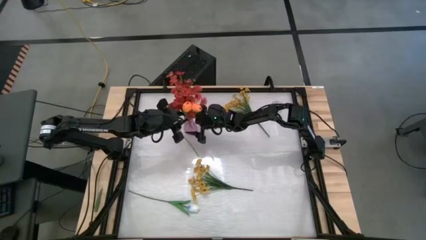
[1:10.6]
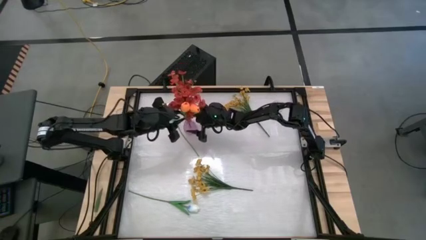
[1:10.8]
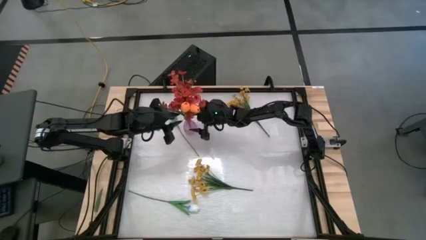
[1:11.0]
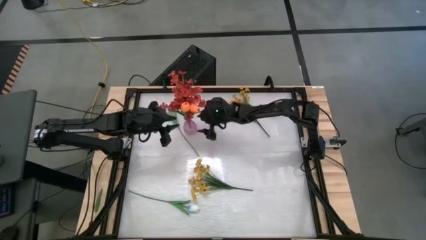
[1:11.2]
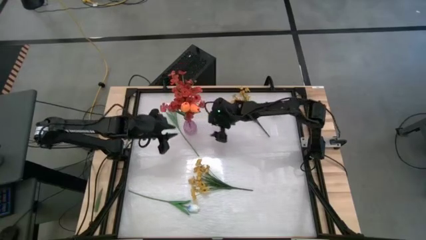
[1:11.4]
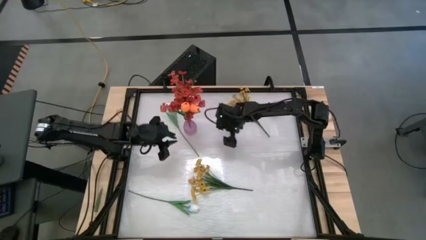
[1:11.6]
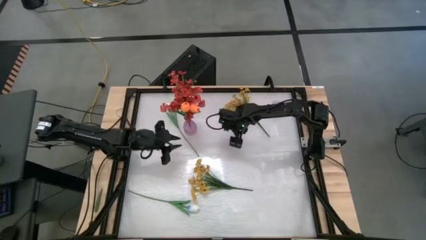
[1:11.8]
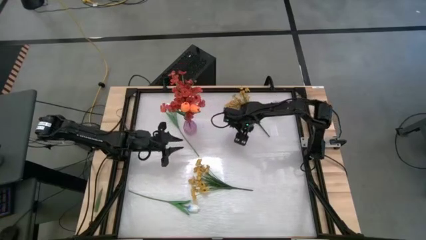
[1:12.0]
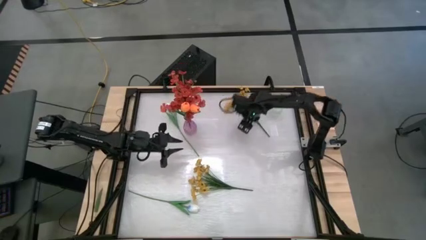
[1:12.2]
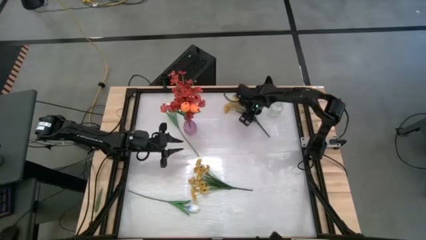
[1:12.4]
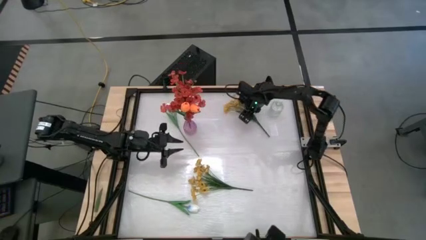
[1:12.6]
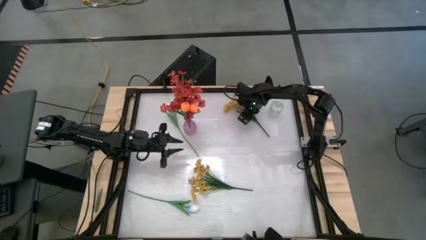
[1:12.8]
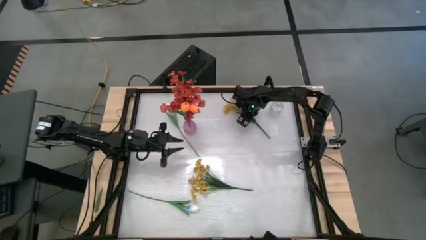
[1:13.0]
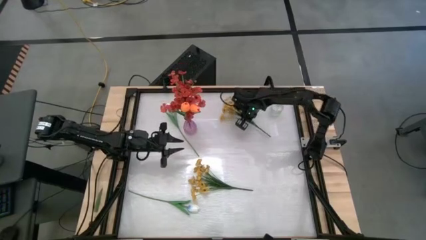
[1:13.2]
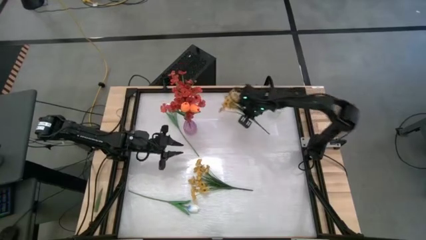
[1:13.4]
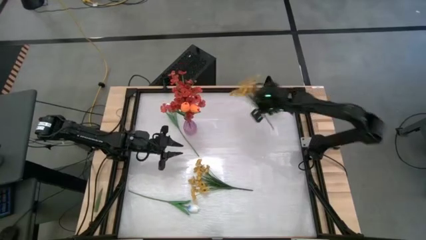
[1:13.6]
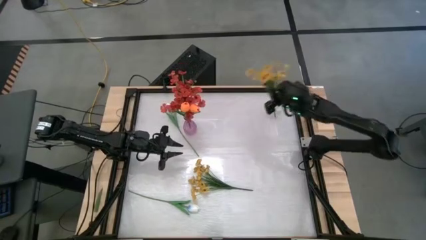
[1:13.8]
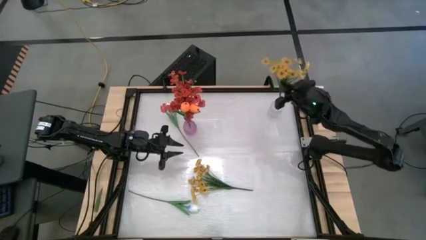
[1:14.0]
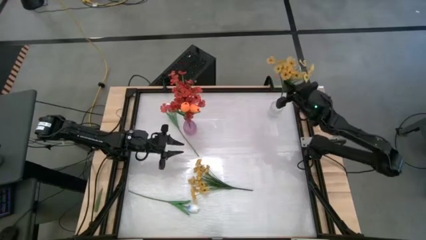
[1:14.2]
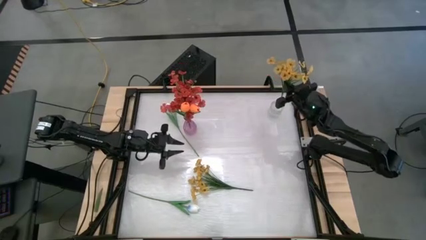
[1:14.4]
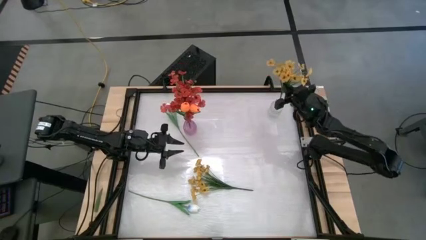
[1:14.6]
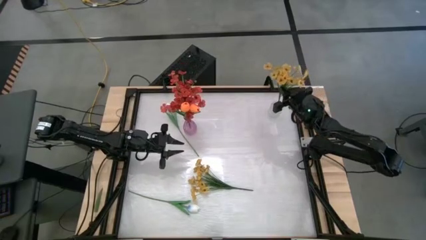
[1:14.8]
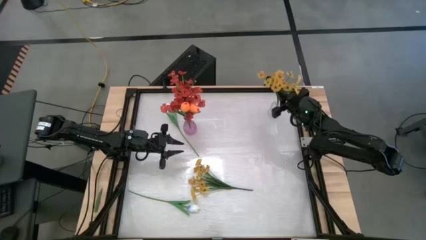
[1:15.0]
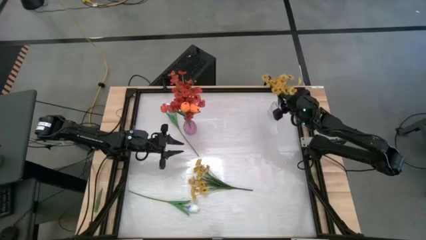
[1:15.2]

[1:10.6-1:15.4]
Task: Sort flowers into vase by color
Put the top yellow flowers into the transparent vase

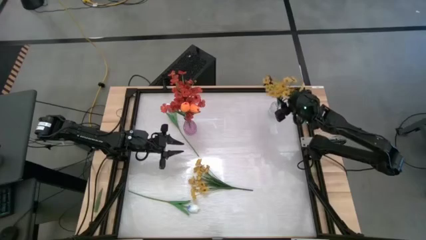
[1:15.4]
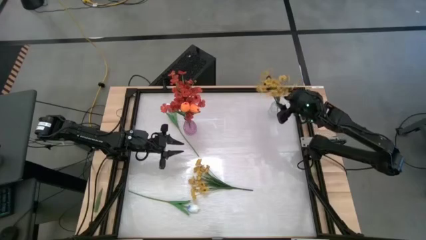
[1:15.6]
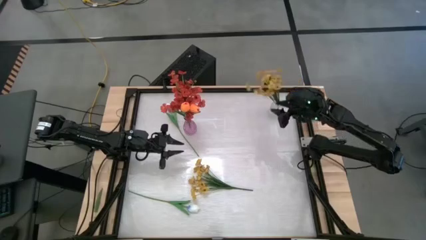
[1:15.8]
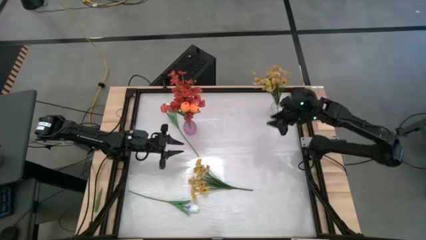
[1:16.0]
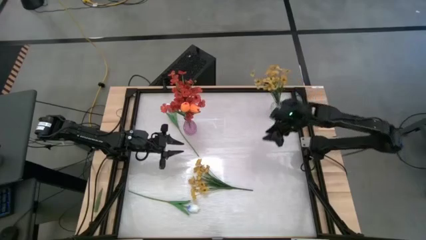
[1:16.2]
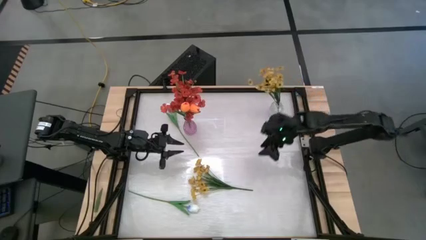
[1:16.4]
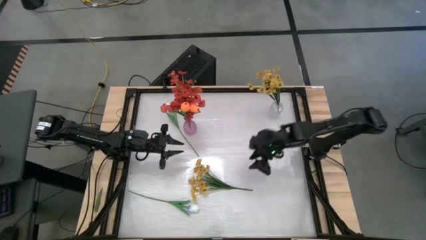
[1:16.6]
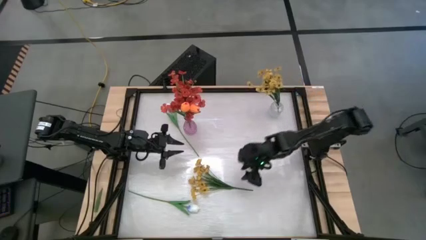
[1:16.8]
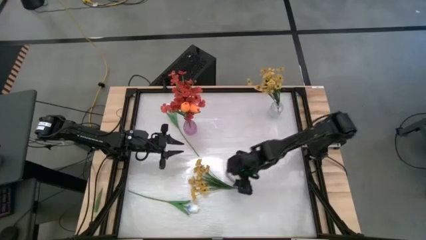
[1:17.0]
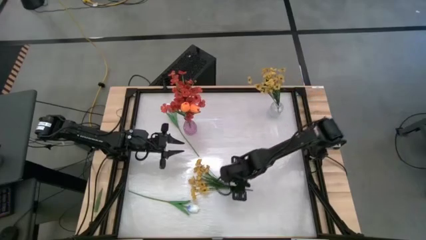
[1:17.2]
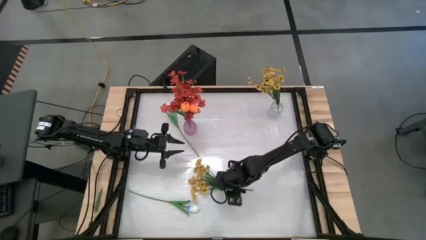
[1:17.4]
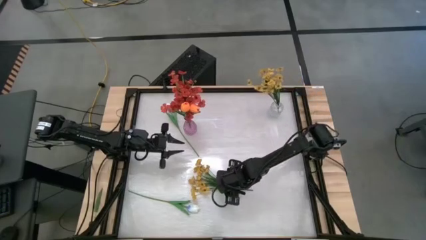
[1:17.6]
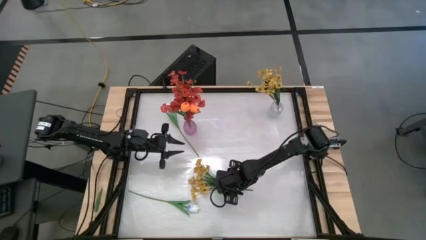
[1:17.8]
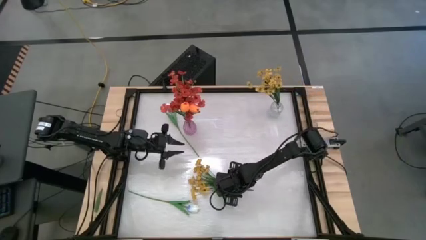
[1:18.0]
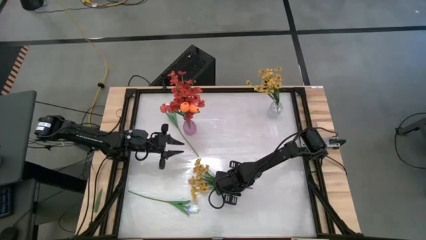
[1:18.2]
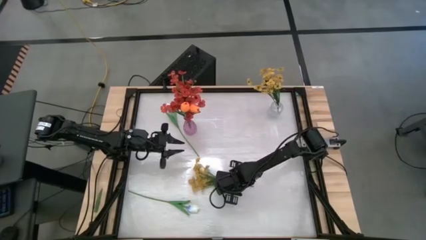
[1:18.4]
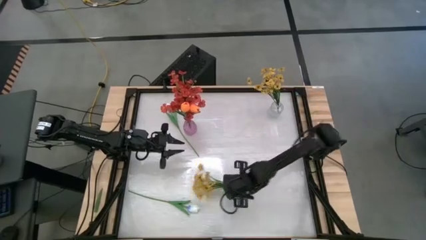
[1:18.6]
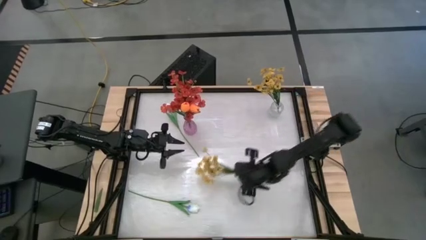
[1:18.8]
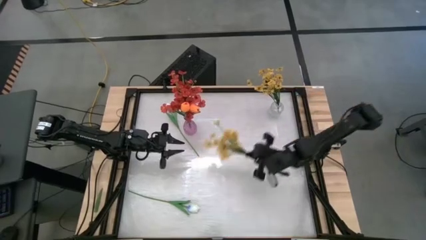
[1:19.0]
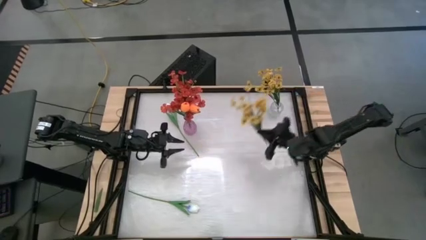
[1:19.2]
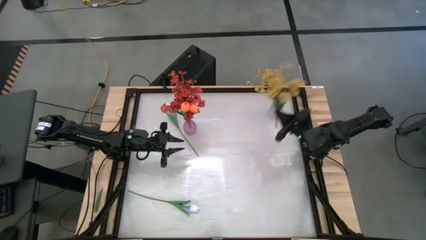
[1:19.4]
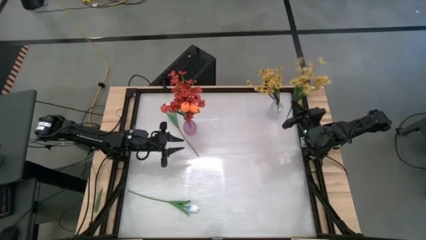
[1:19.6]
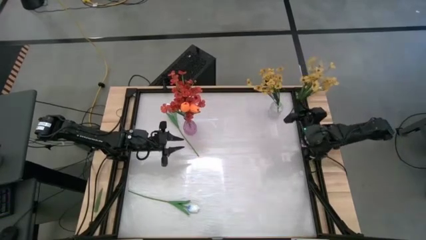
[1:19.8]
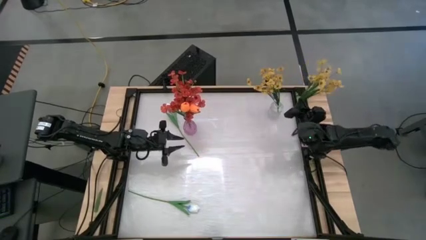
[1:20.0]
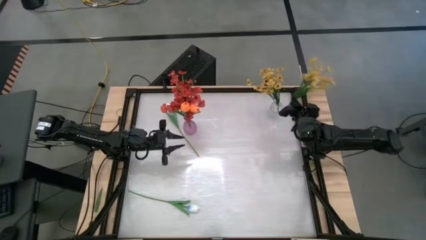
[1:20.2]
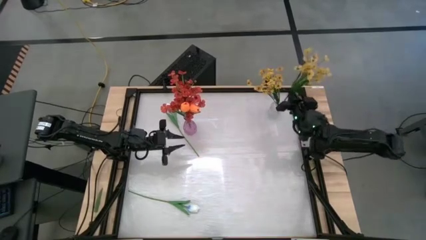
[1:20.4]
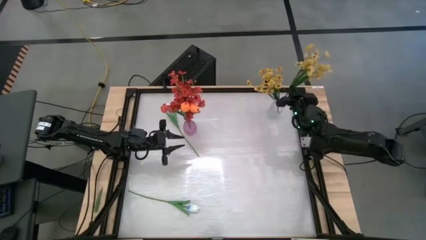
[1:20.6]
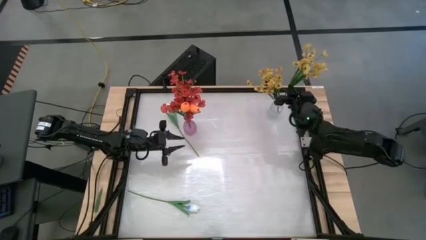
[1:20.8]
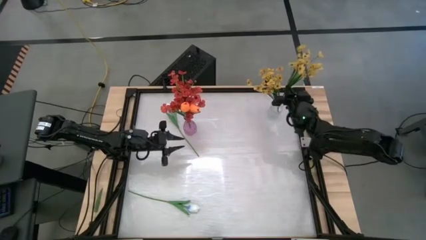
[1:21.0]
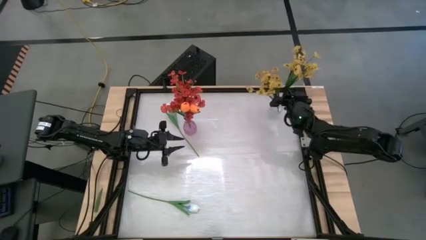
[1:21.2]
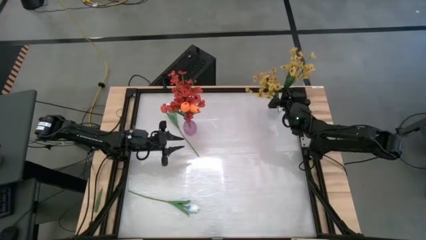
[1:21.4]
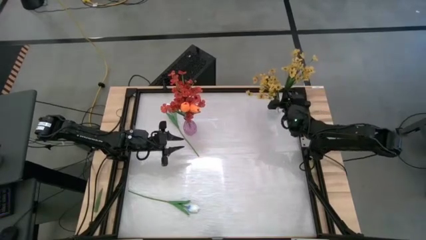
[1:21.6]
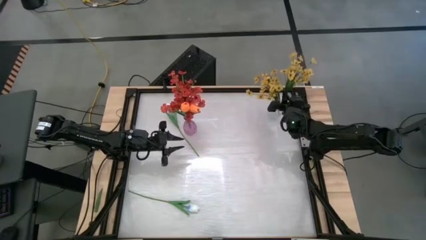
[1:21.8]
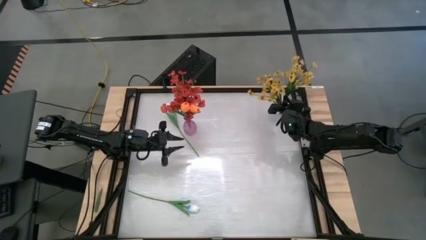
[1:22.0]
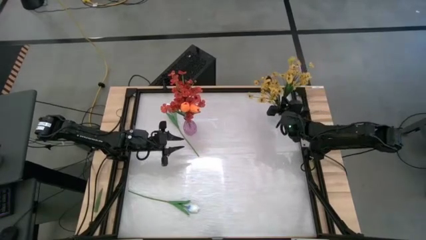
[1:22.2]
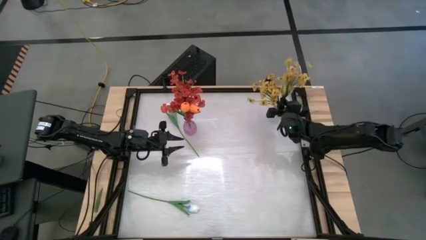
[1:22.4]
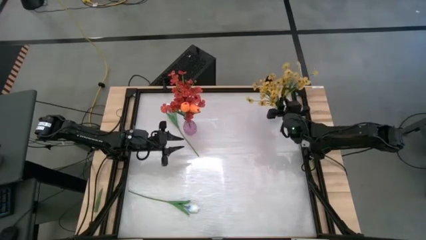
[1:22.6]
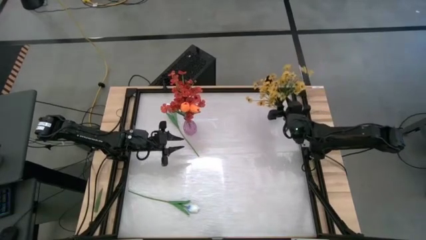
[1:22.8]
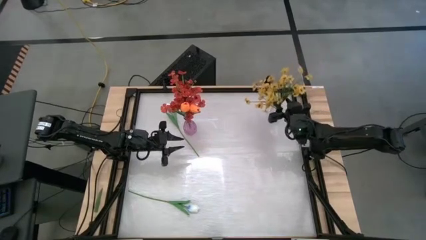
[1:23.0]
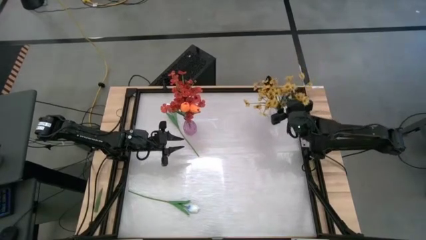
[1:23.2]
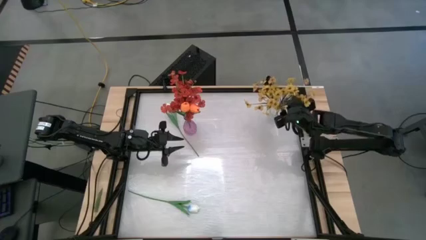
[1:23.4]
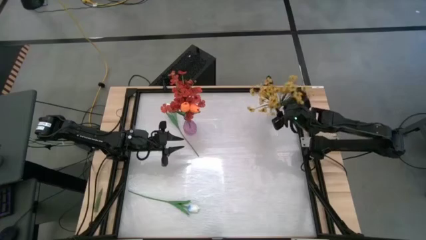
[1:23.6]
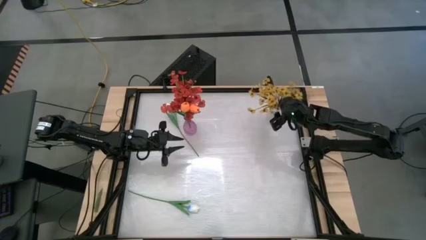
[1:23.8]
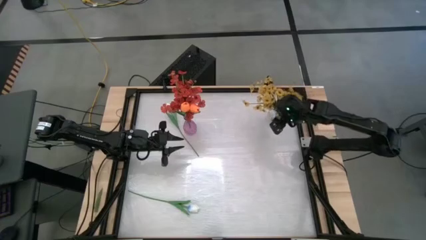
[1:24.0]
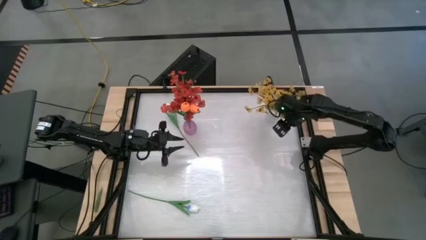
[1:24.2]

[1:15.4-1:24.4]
Put the yellow flowers into the transparent vase
